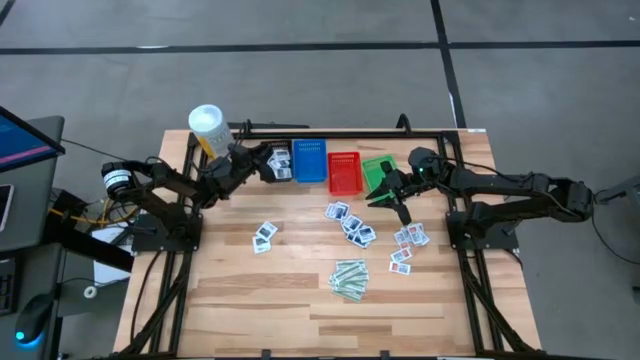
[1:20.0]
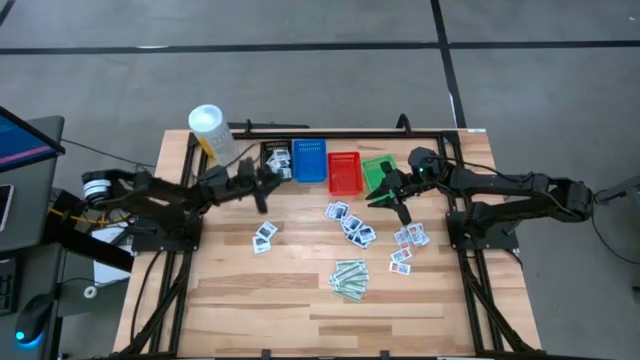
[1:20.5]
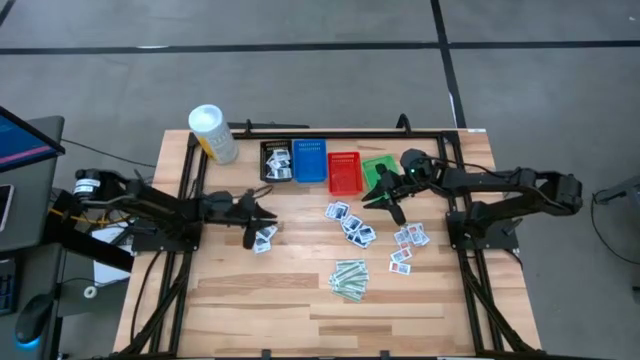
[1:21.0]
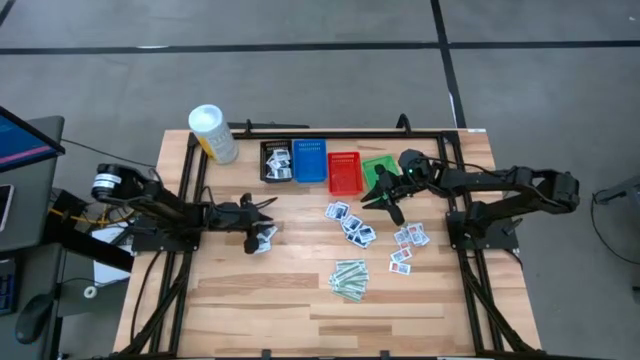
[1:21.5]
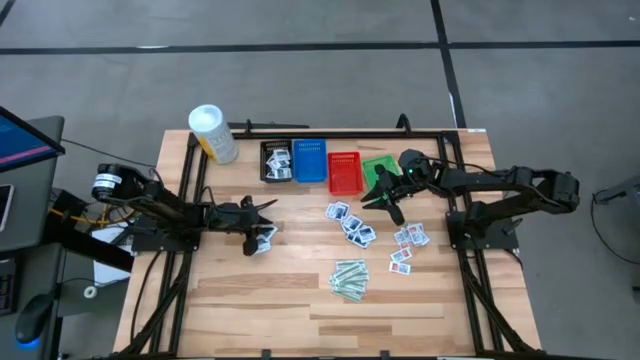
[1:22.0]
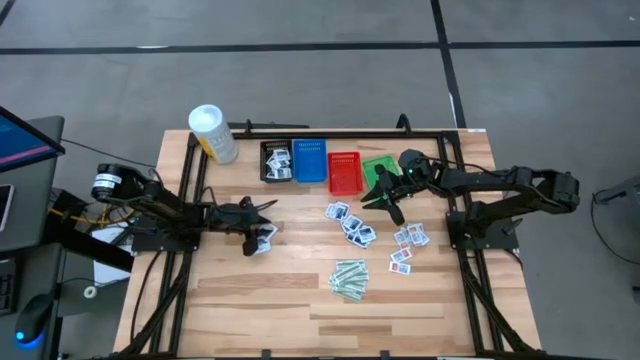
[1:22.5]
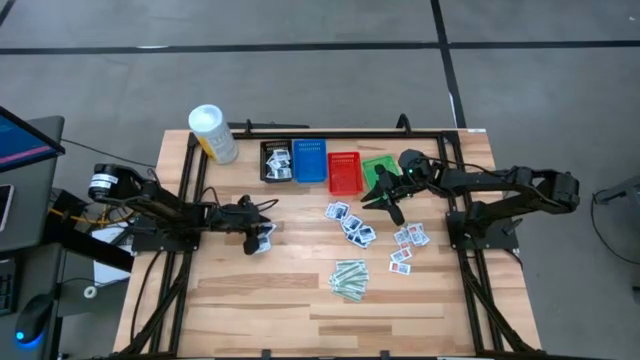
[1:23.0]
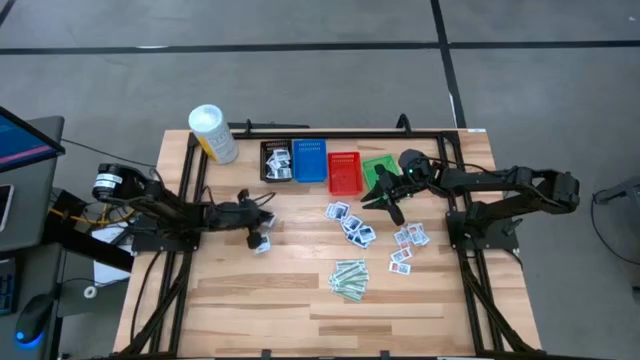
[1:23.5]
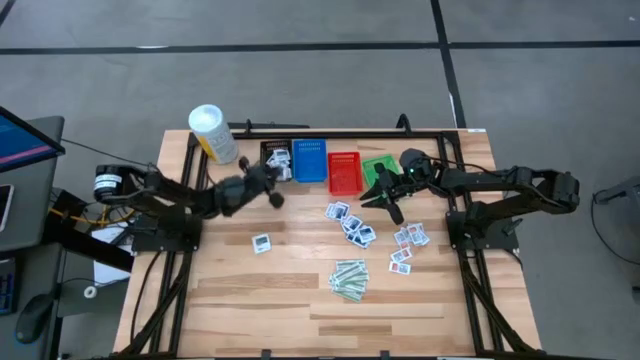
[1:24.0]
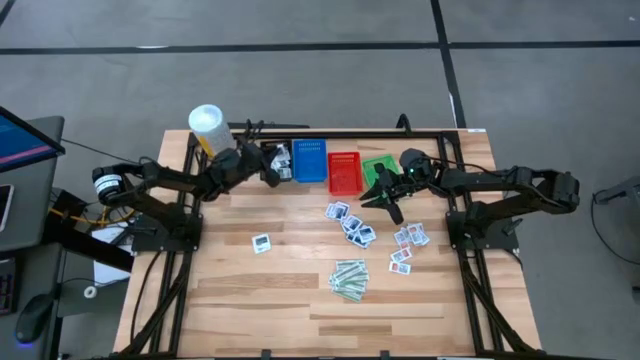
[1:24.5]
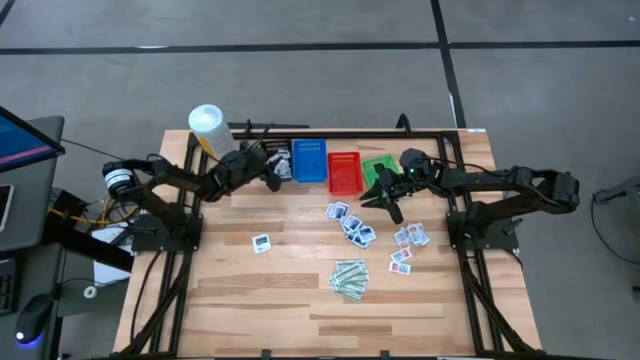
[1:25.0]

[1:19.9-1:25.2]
Task: Pick & Place First Aid Supplies
Put the gray pad into the black bin

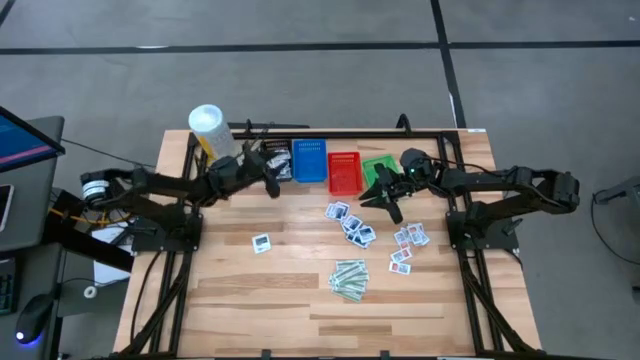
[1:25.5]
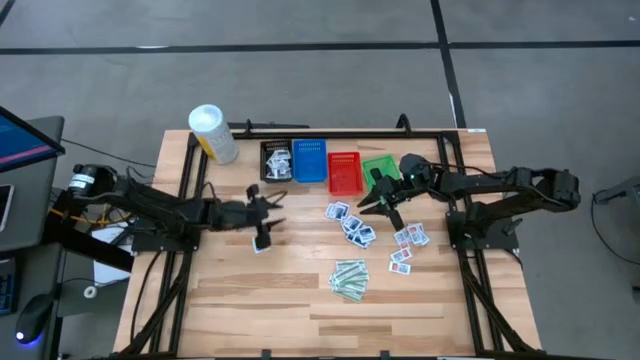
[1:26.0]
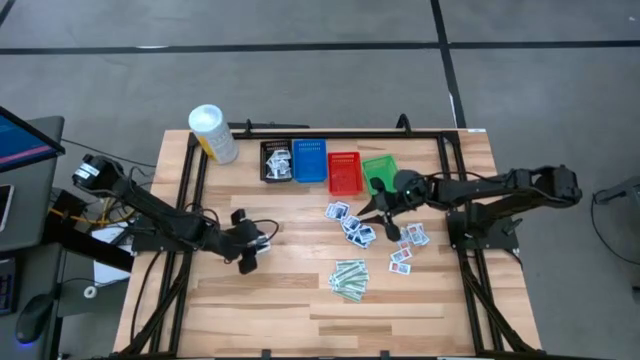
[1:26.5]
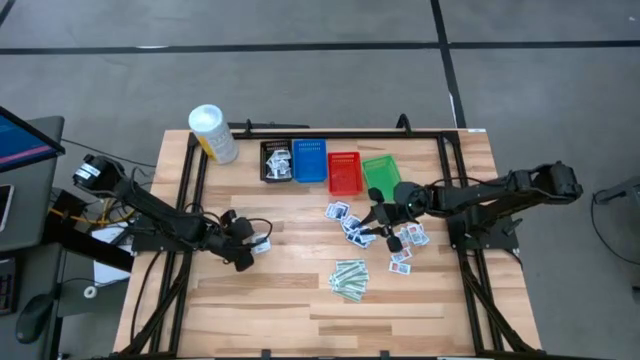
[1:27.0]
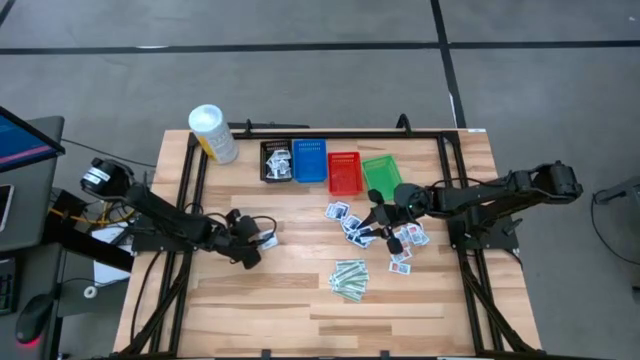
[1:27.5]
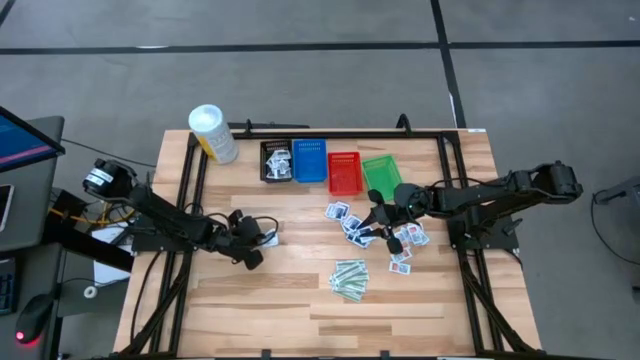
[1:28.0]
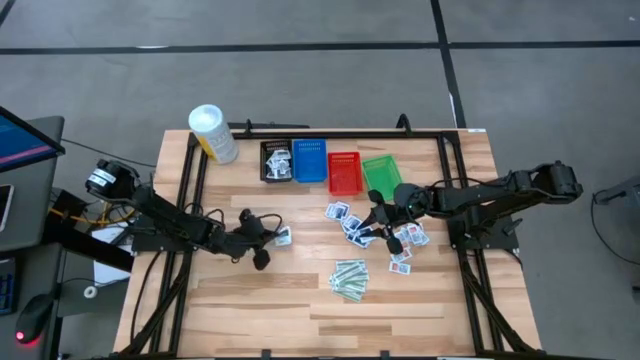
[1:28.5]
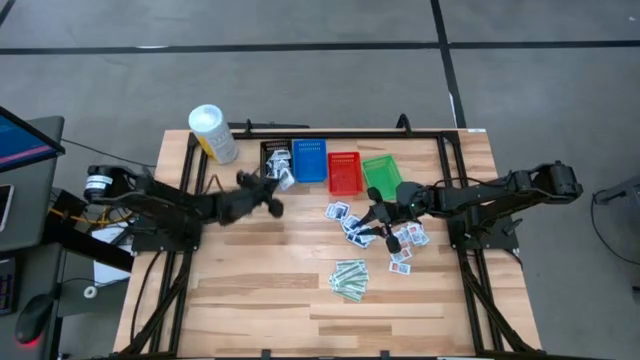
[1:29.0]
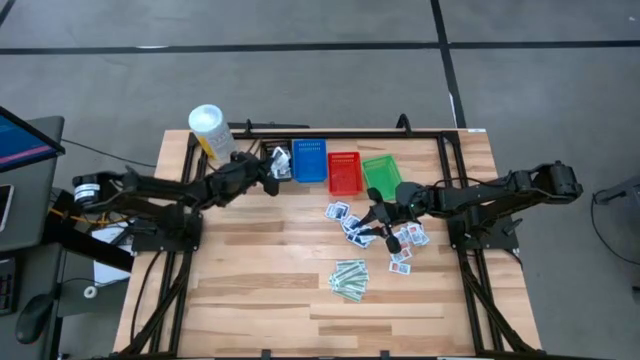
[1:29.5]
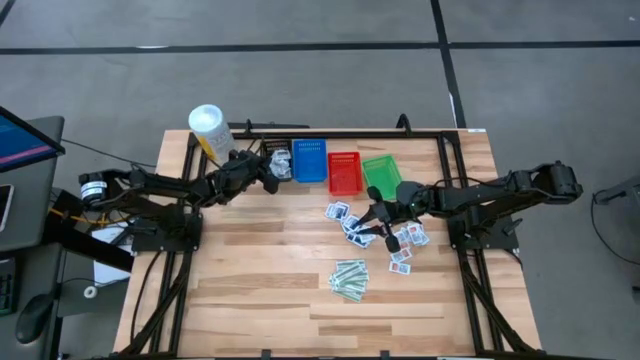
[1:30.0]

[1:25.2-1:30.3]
Put the gray pad into the black bin

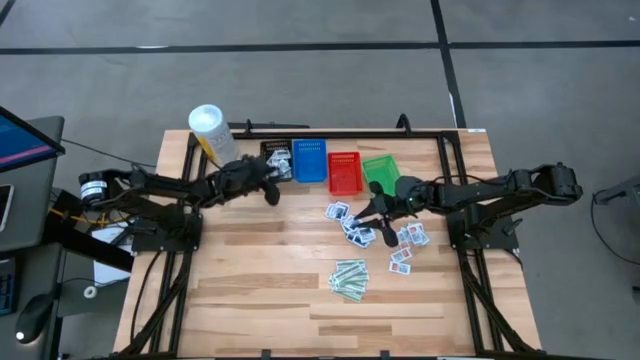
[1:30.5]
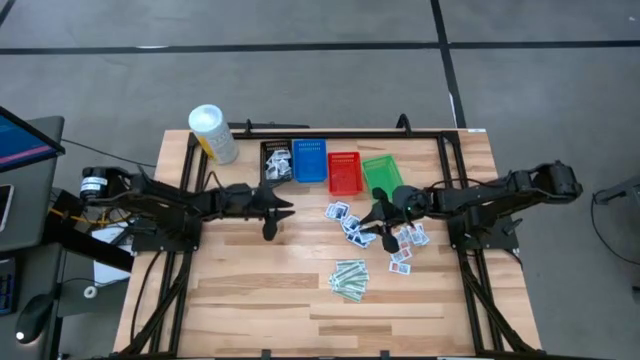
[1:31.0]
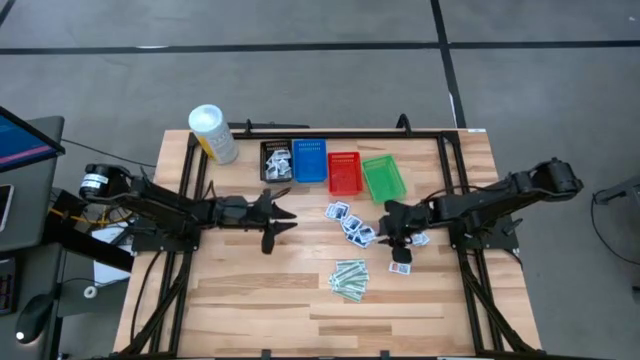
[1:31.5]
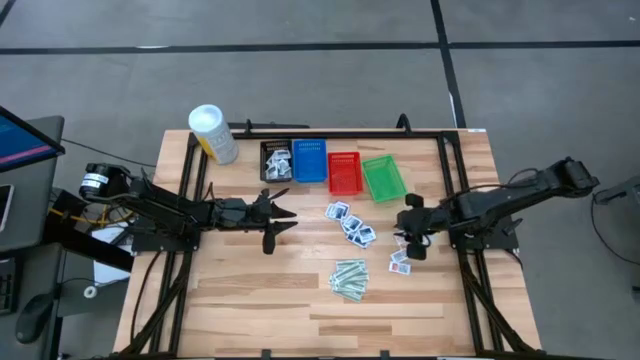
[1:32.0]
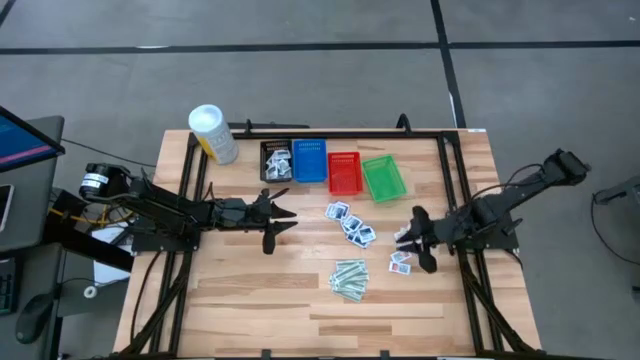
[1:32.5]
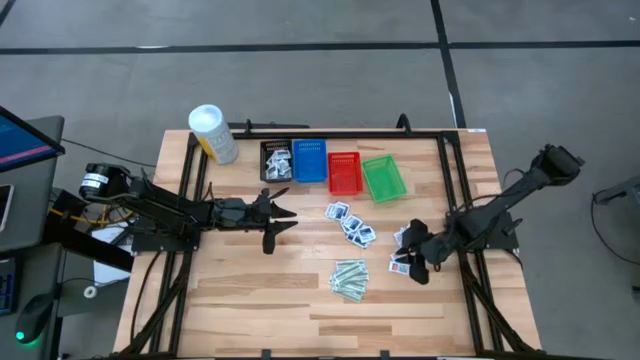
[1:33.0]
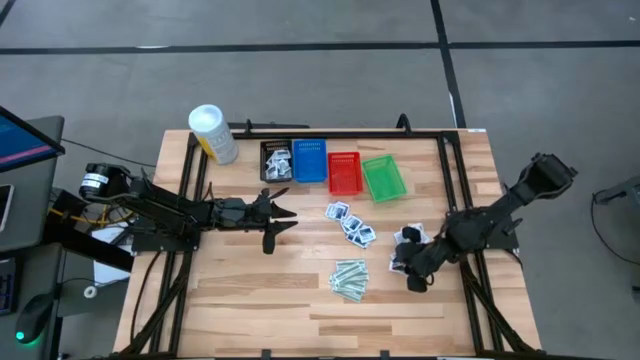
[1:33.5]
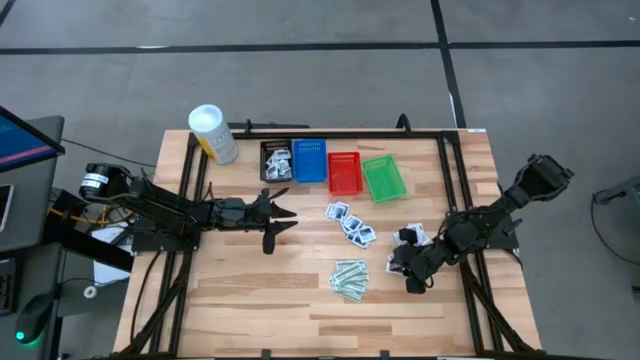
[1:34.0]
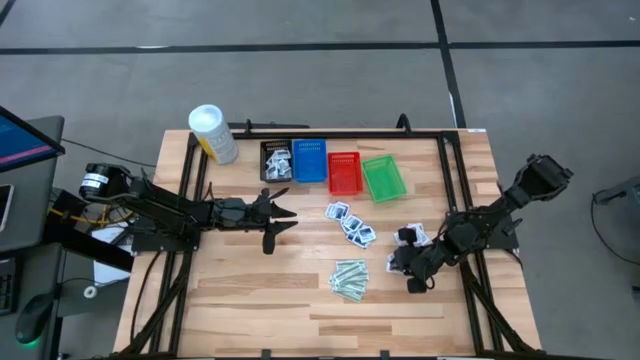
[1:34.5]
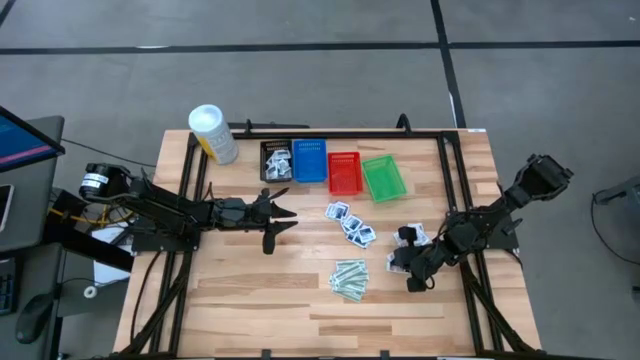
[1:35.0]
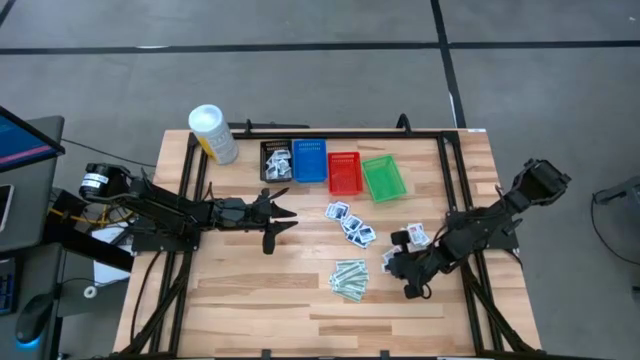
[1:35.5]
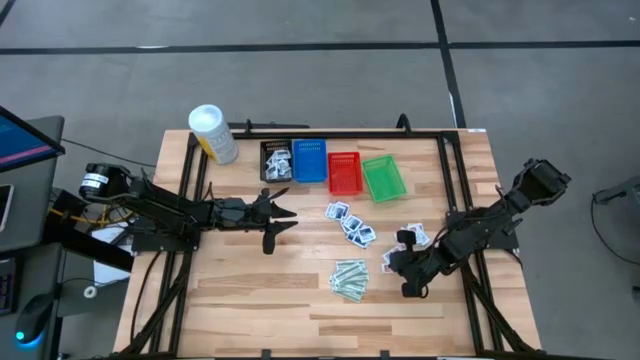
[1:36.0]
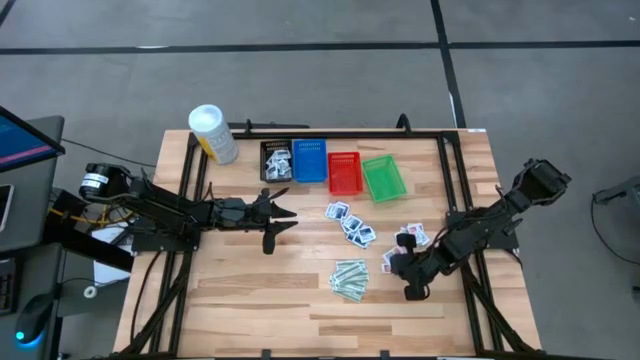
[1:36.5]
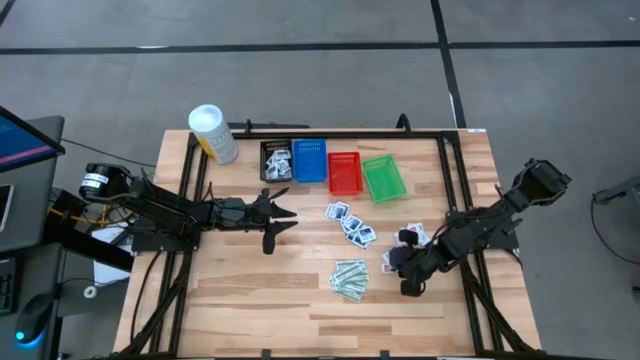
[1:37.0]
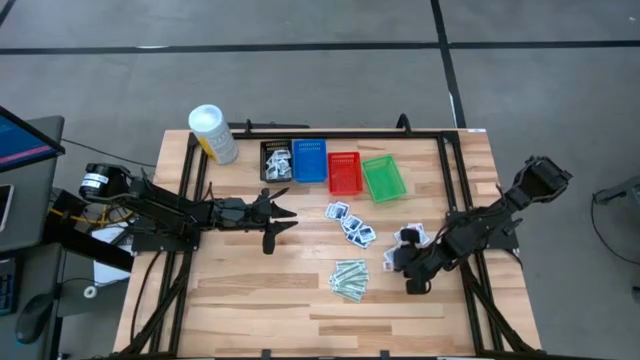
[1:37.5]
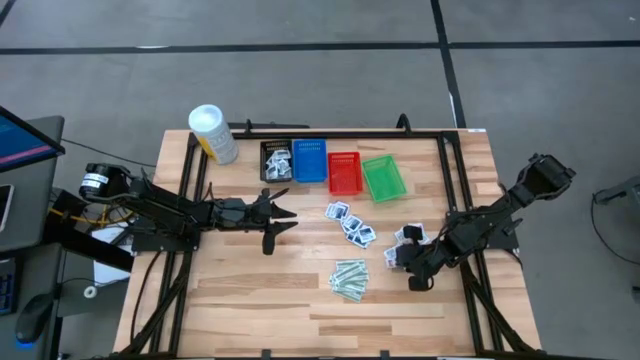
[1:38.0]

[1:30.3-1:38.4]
Put the orange pad into the green bin

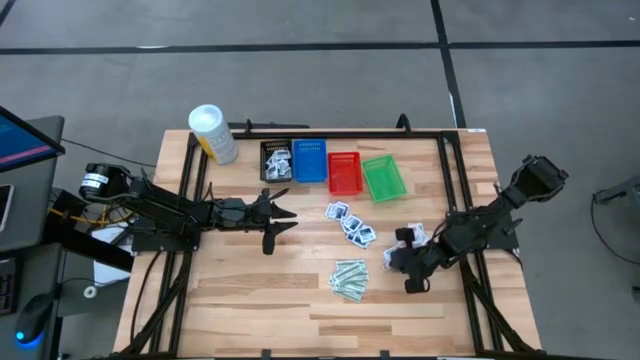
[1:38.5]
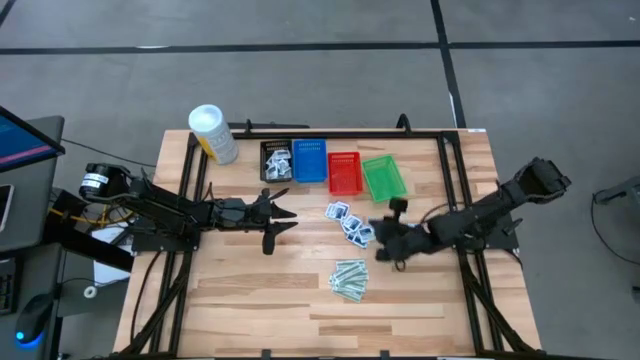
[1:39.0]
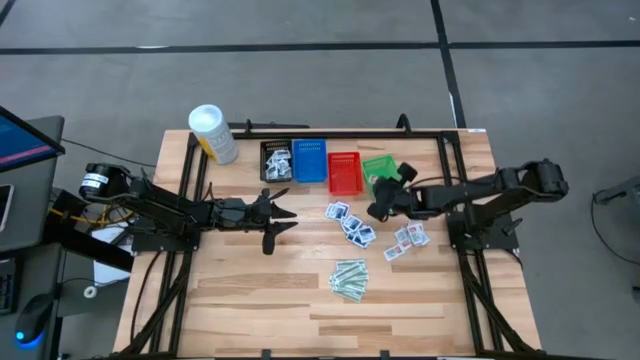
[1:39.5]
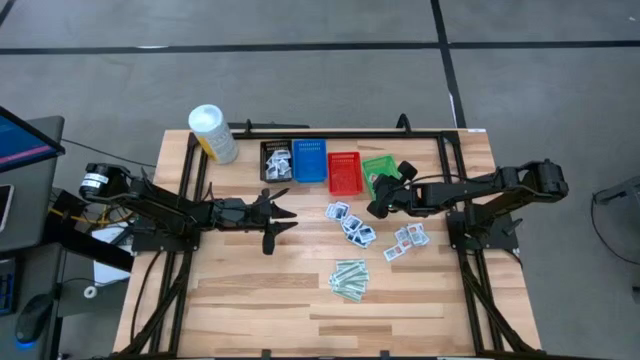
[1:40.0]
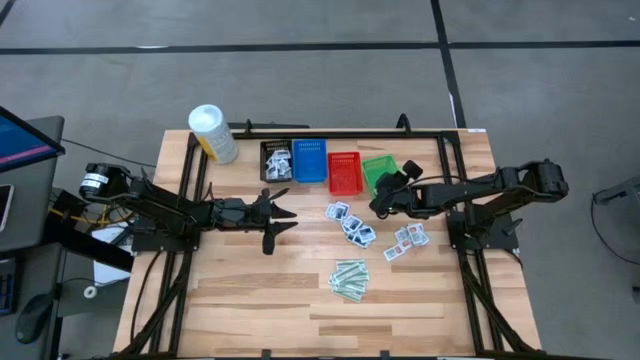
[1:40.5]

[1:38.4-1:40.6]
Put the orange pad into the green bin
